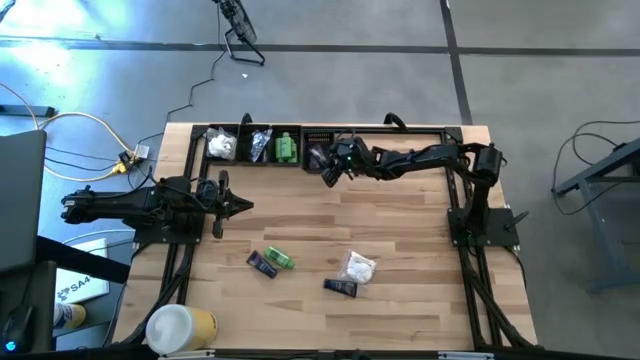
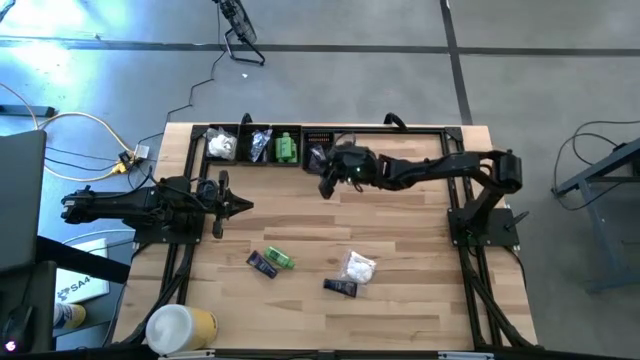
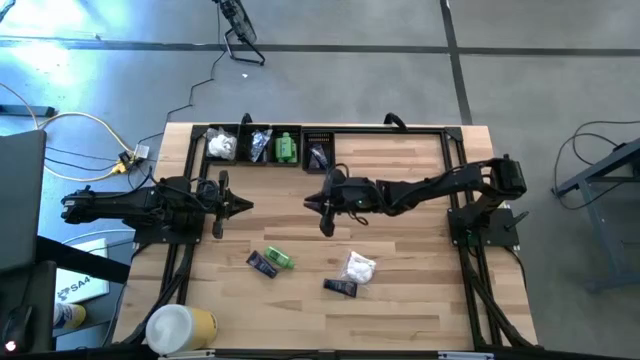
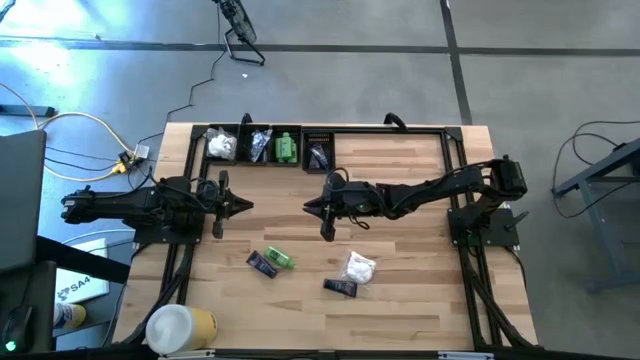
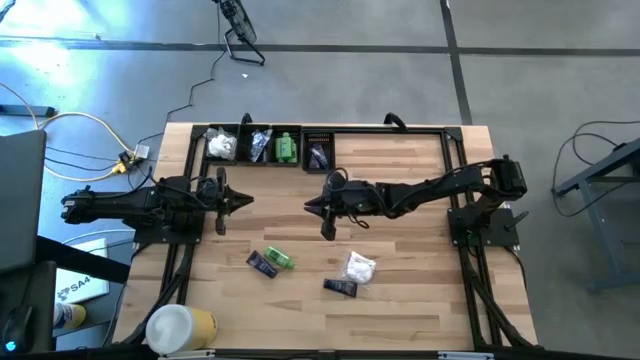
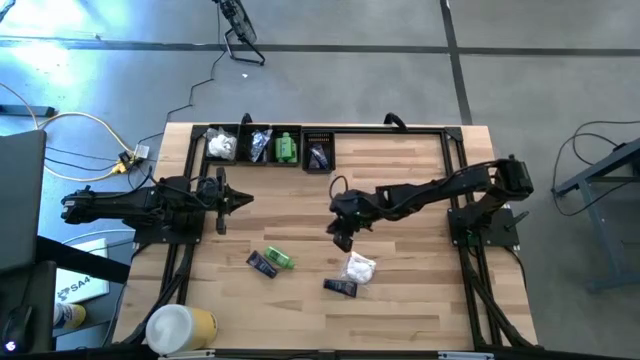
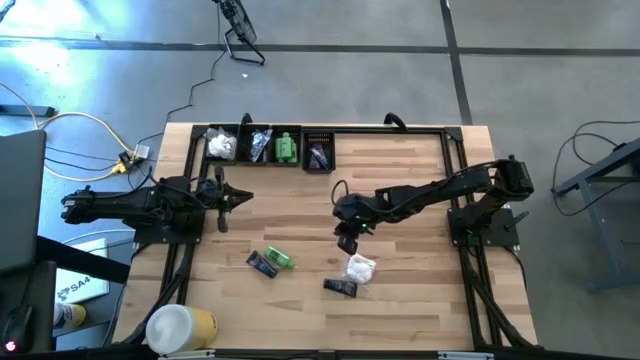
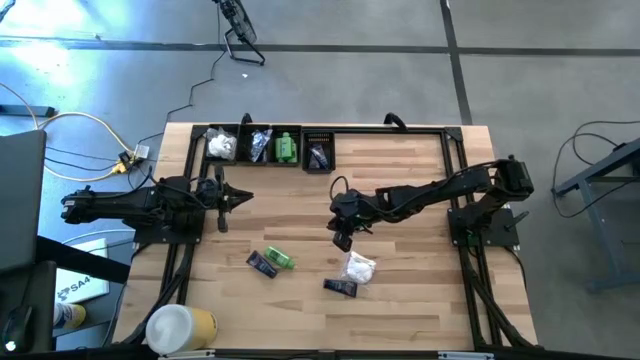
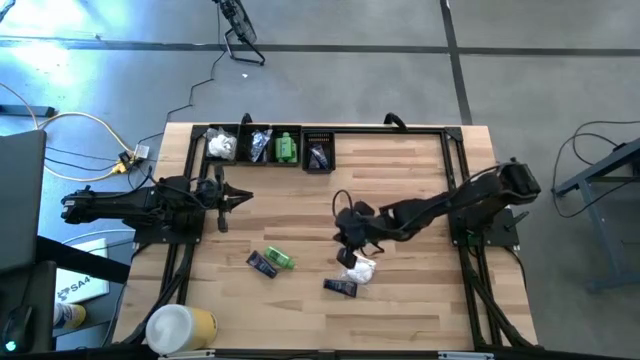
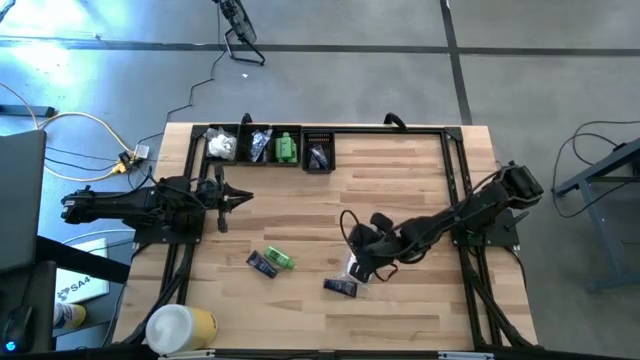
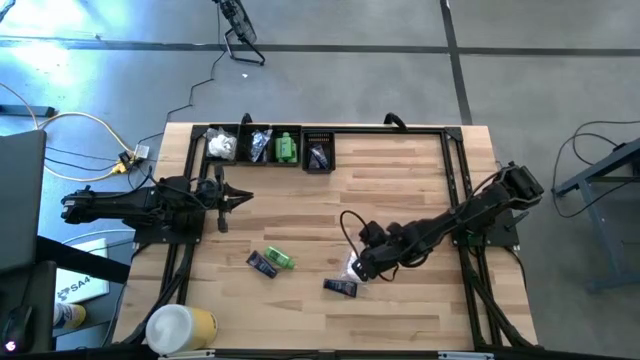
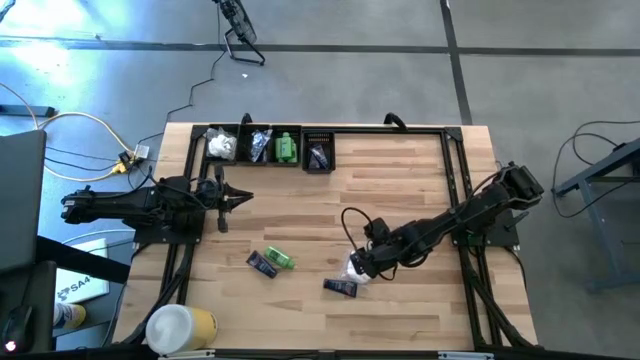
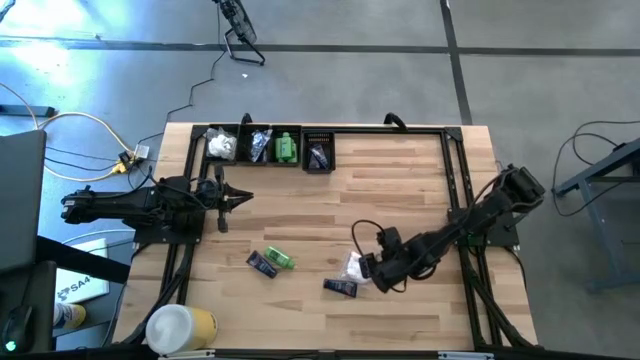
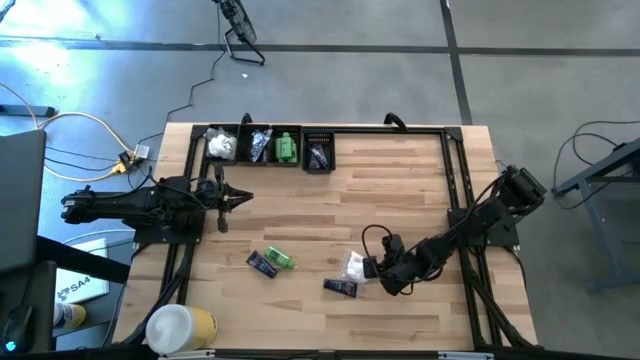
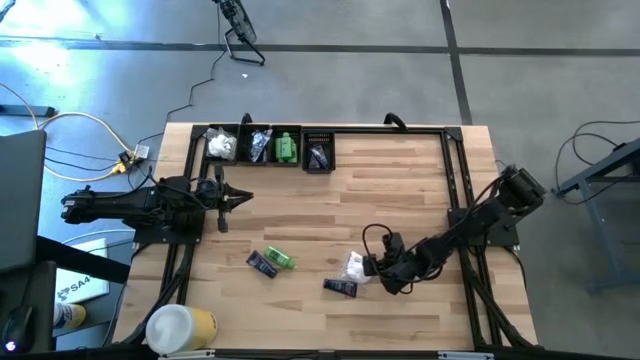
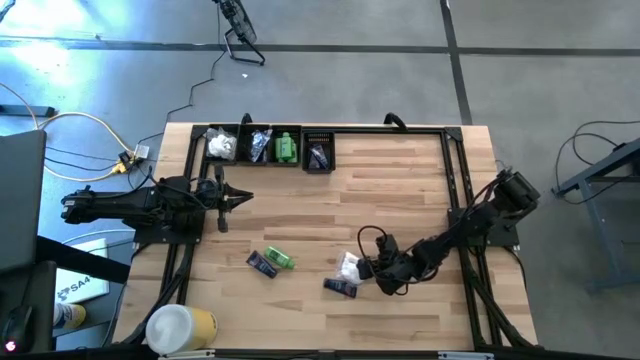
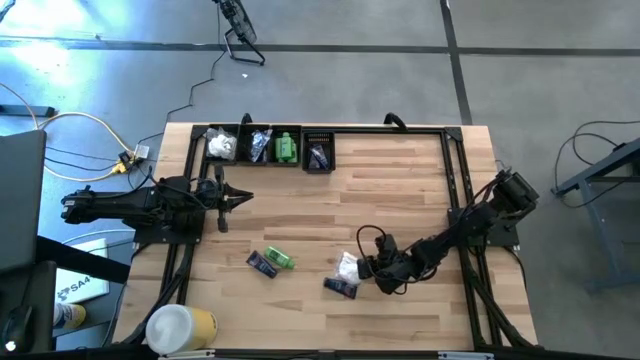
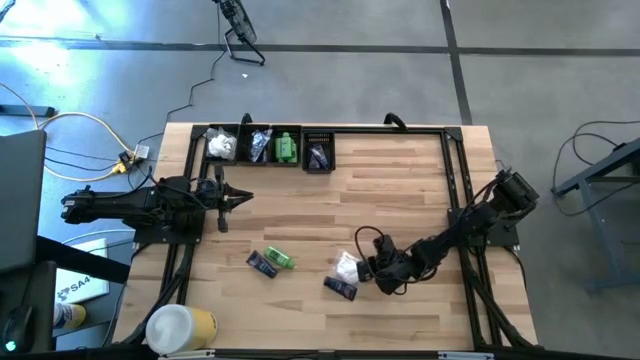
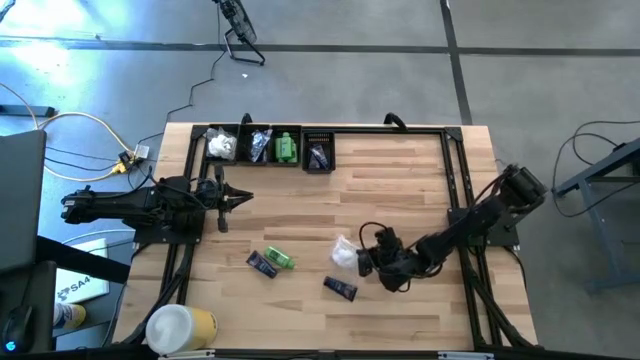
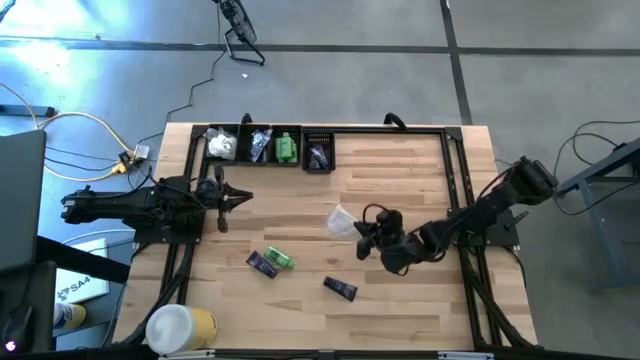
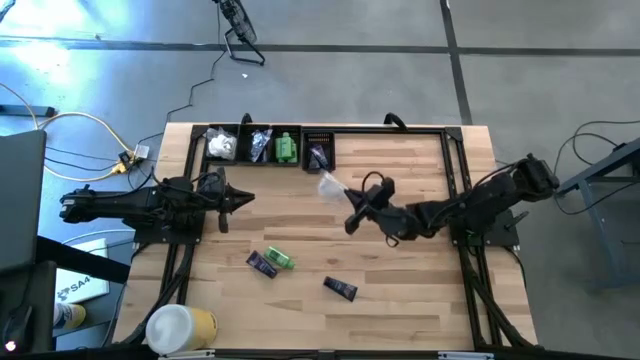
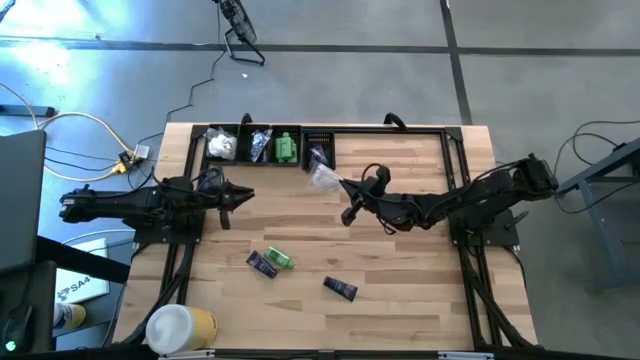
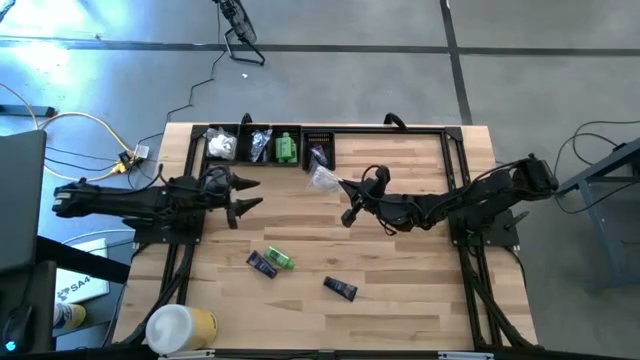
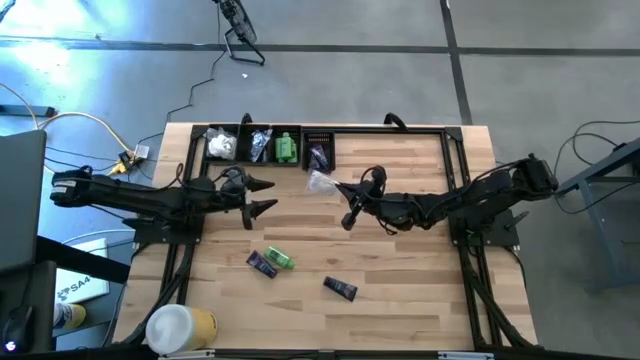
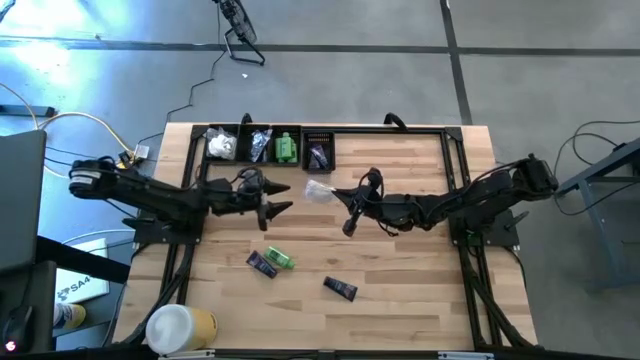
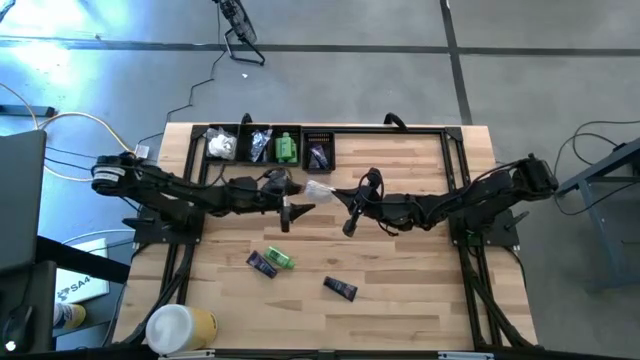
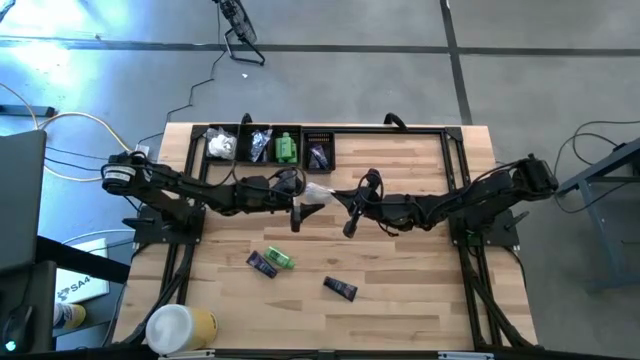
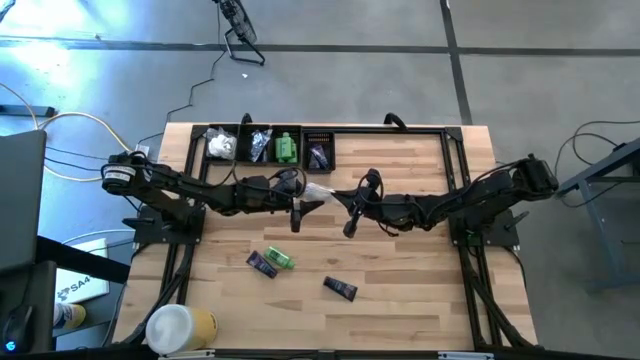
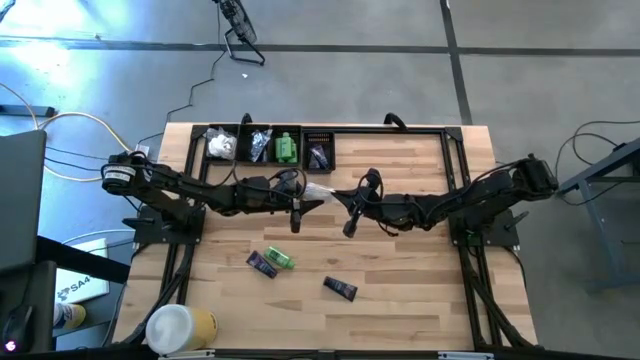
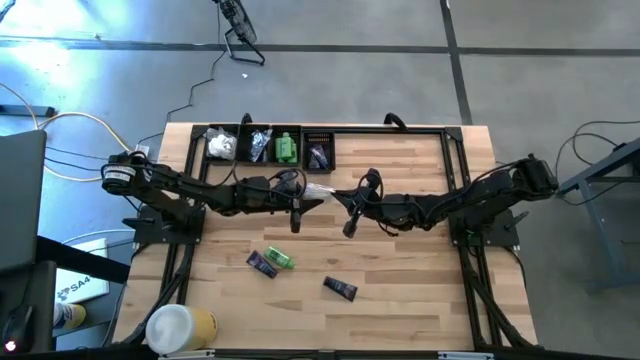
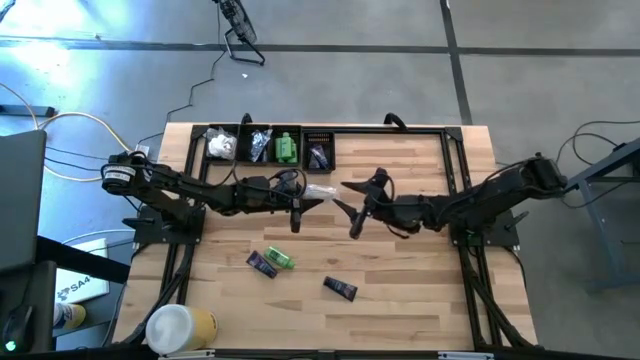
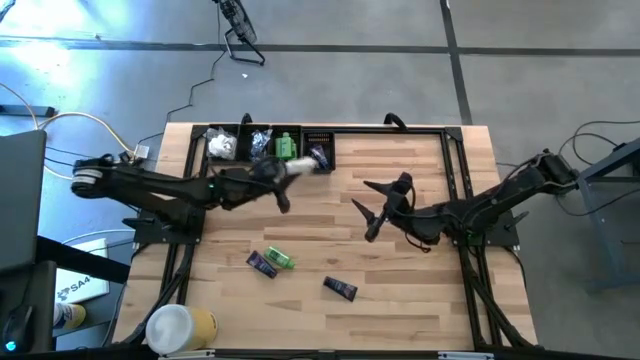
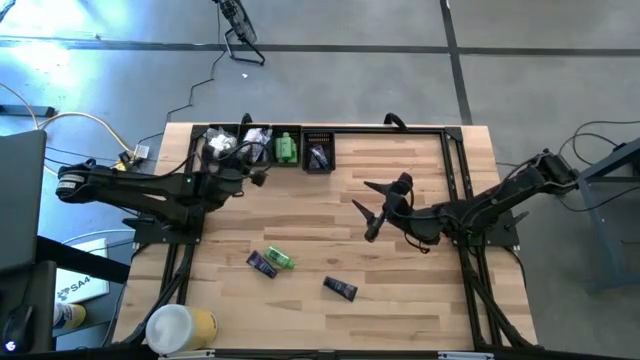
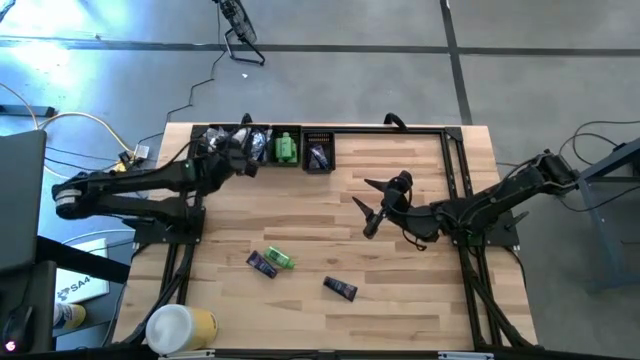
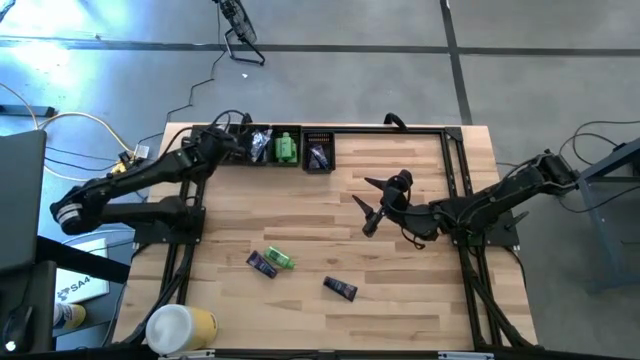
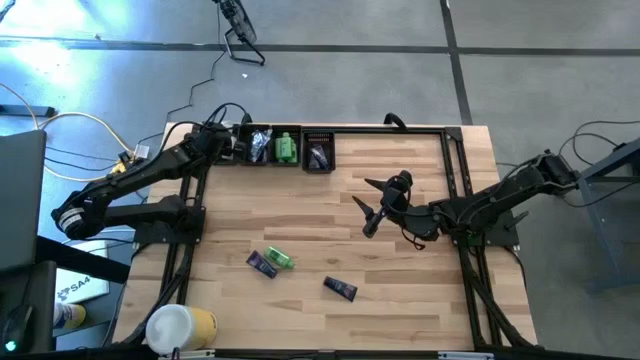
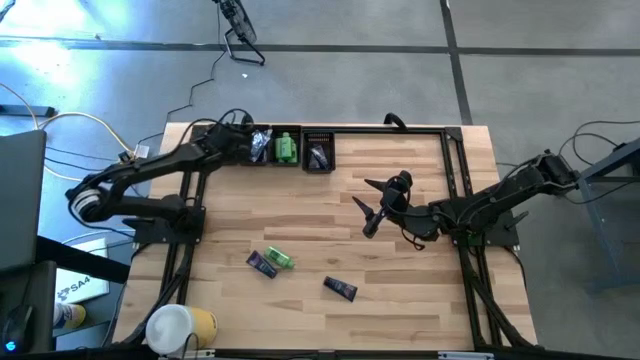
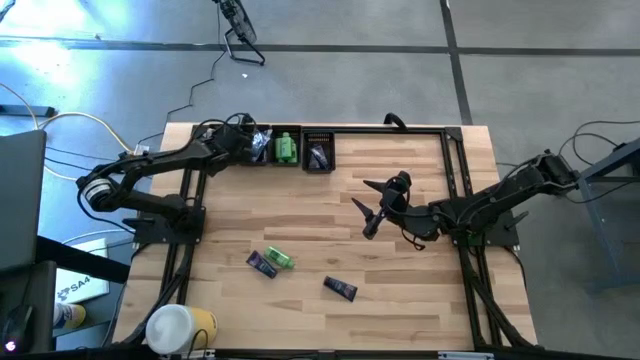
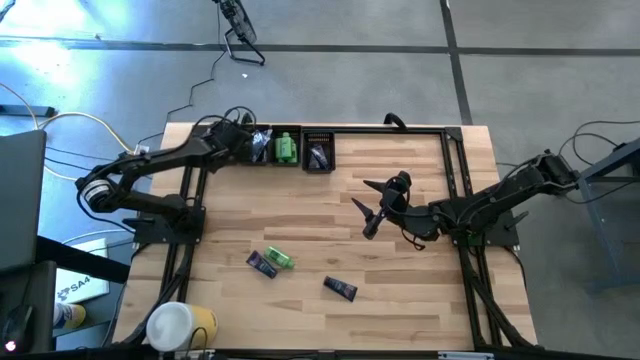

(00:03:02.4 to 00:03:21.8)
Task: Pick & Place Travel size toiletries
Put the cotton pack into the left black bin

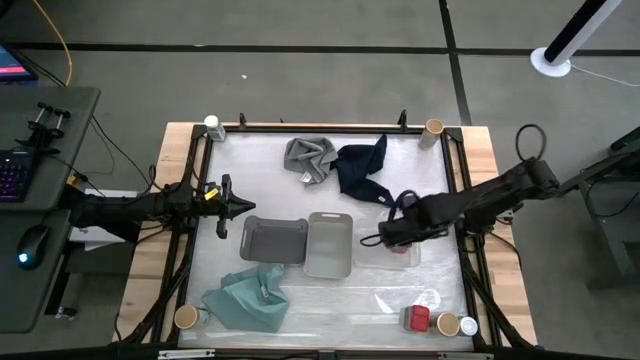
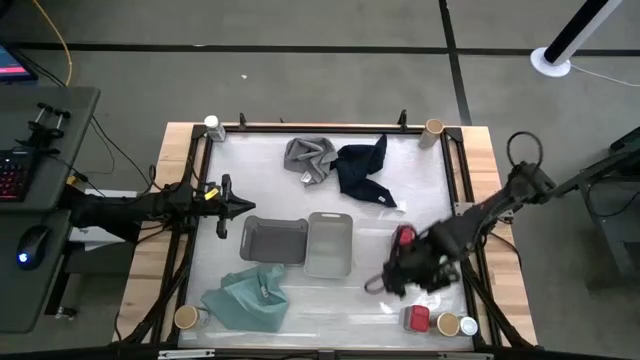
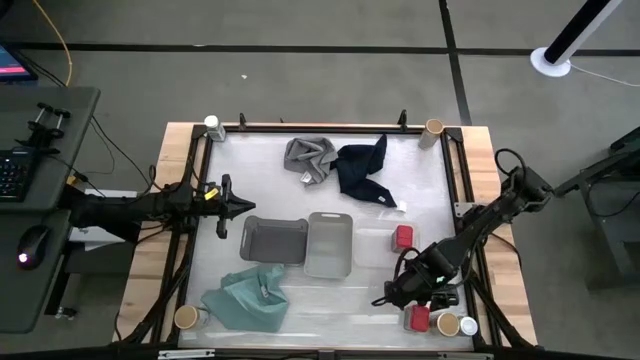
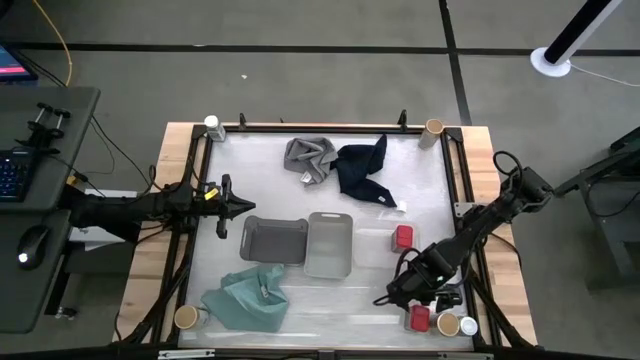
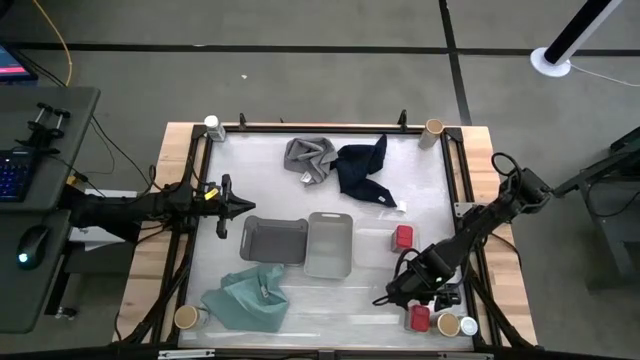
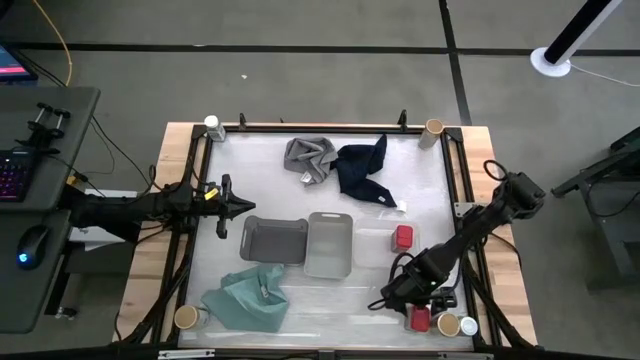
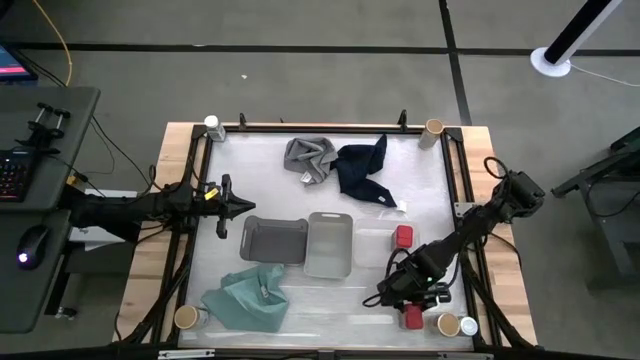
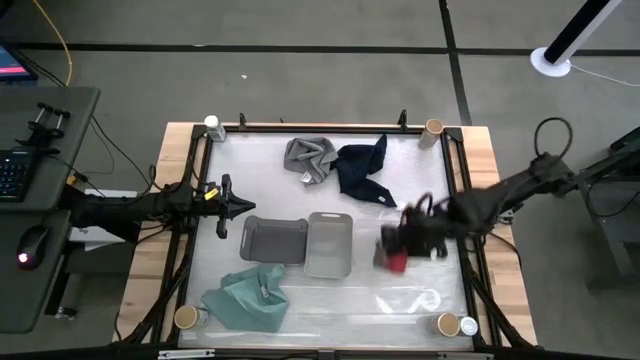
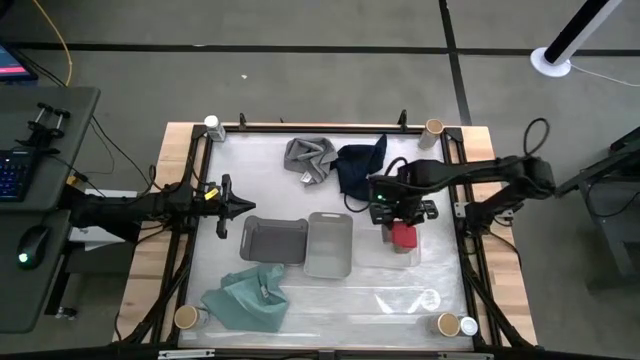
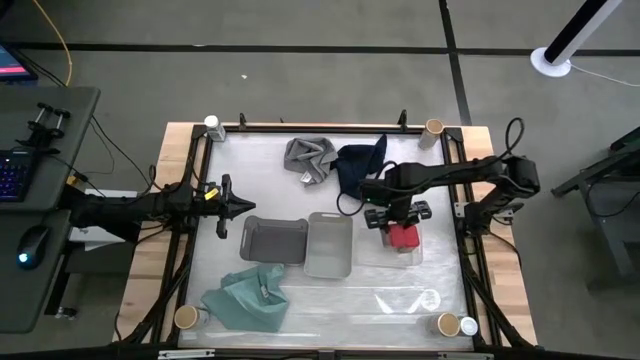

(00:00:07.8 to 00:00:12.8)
Task: Sort spices by type
Put the red spice can into the transparent bin
